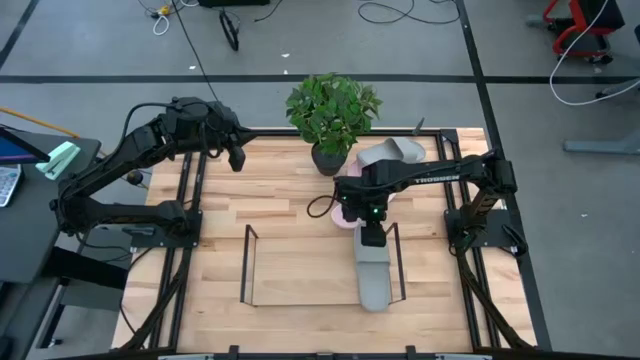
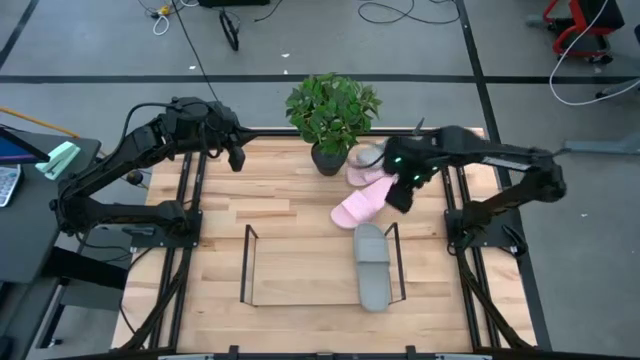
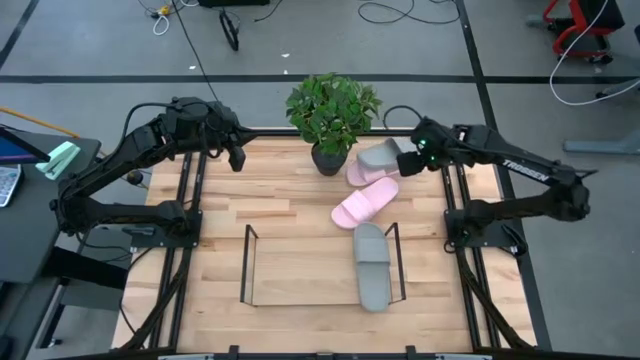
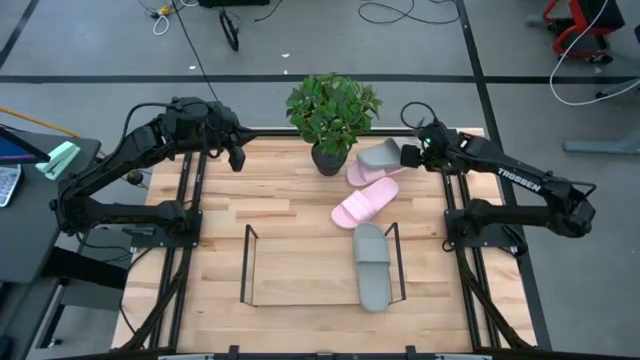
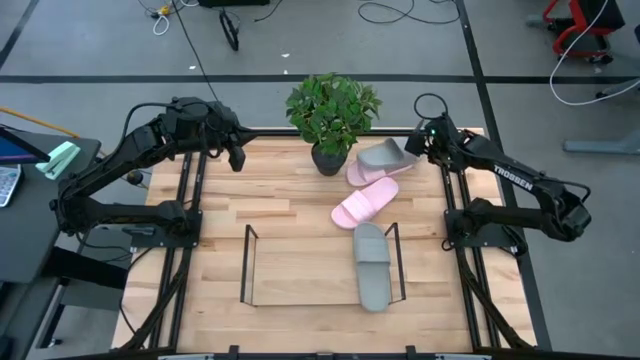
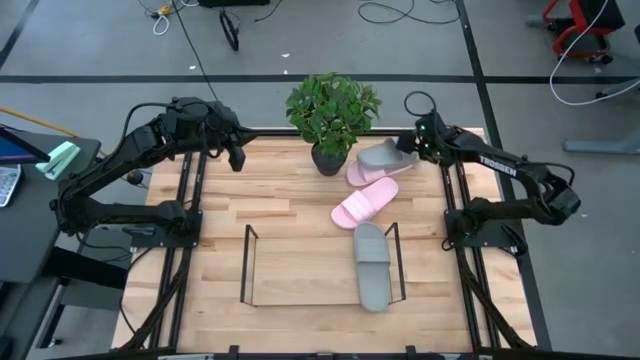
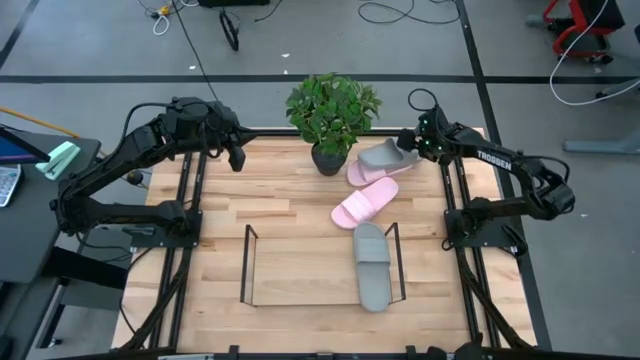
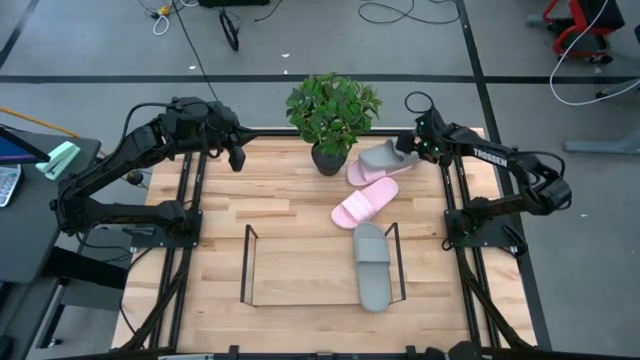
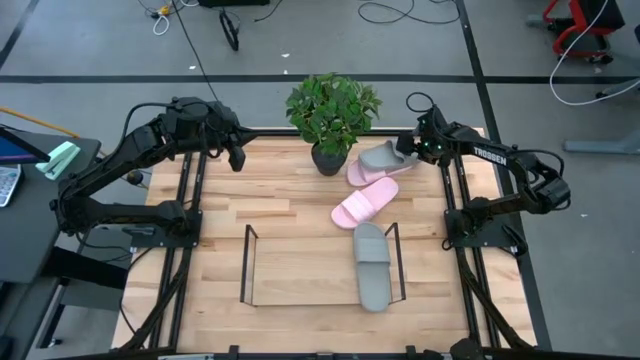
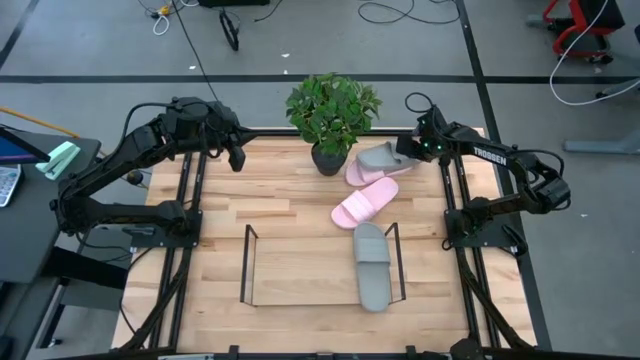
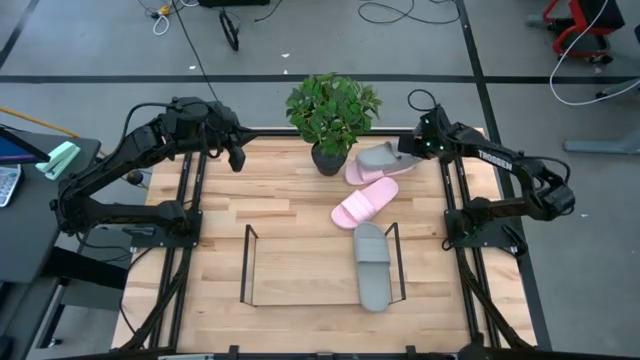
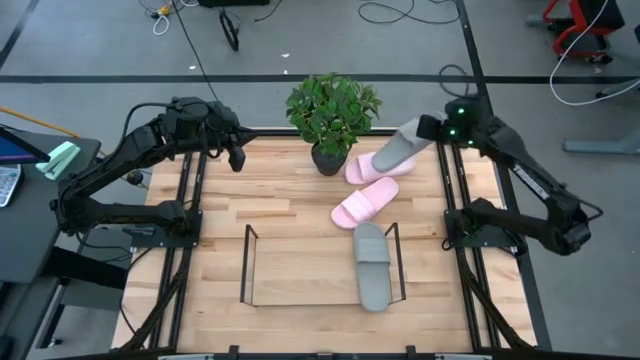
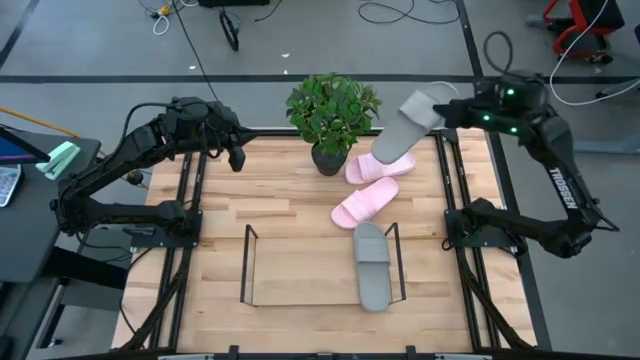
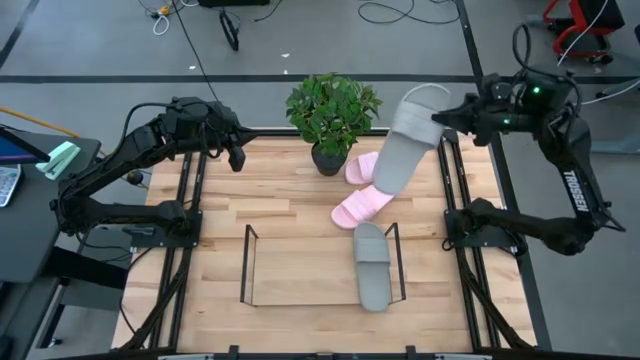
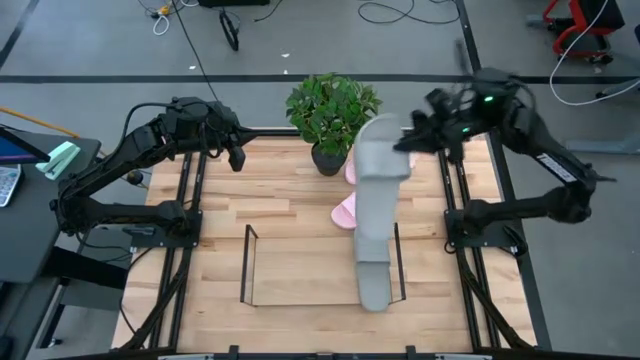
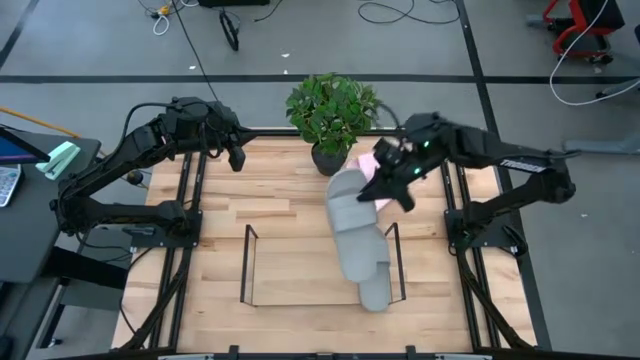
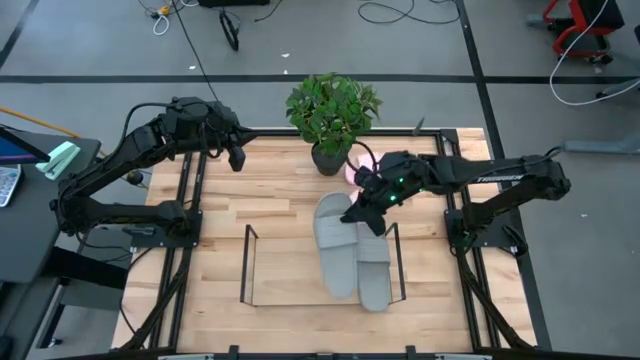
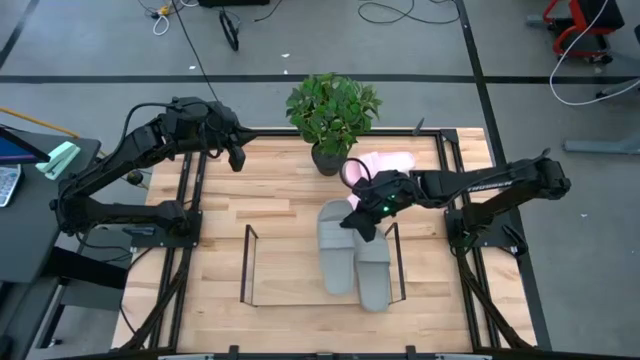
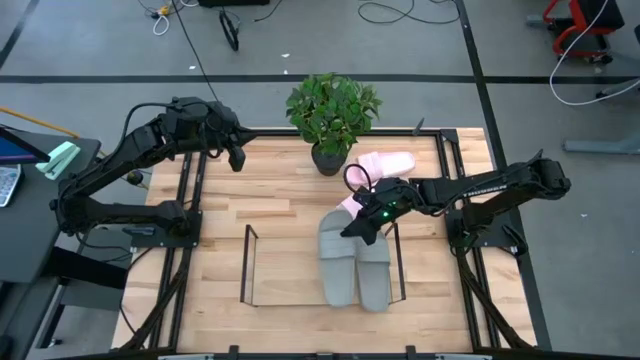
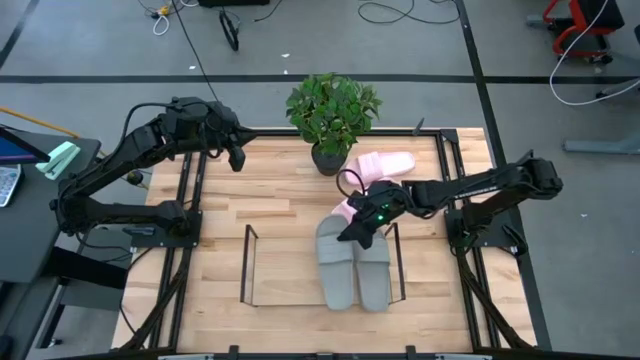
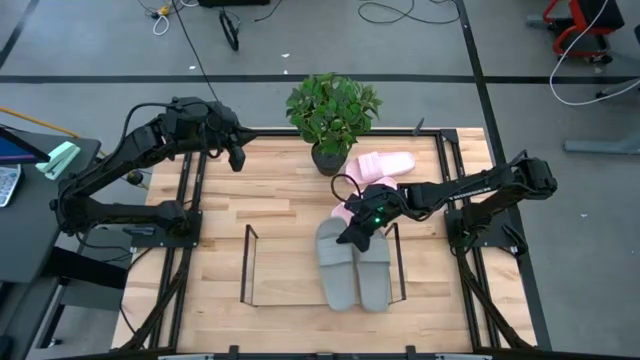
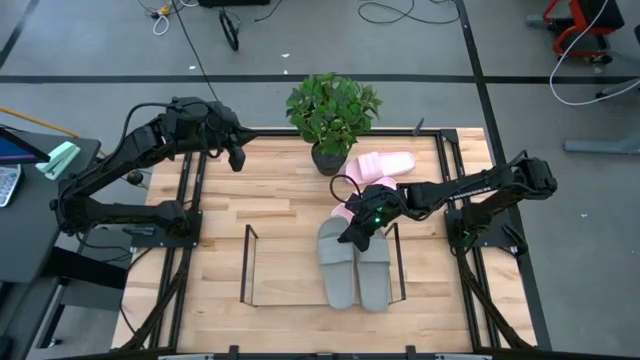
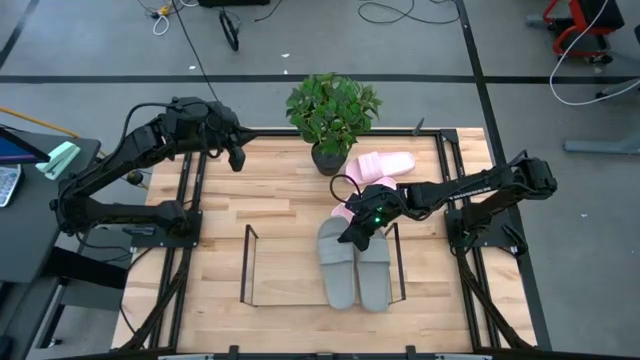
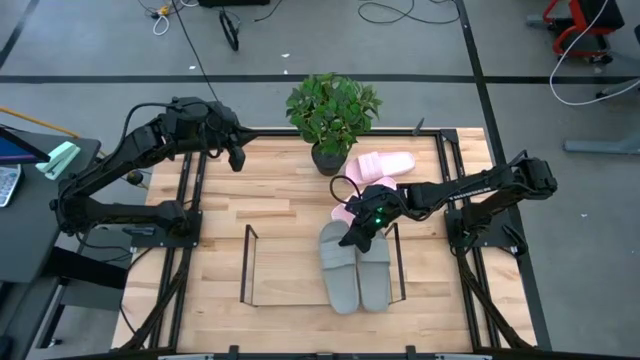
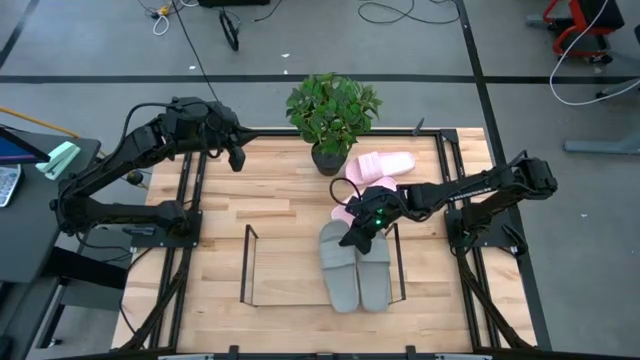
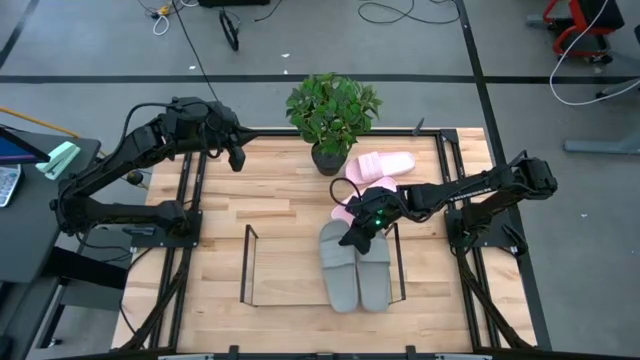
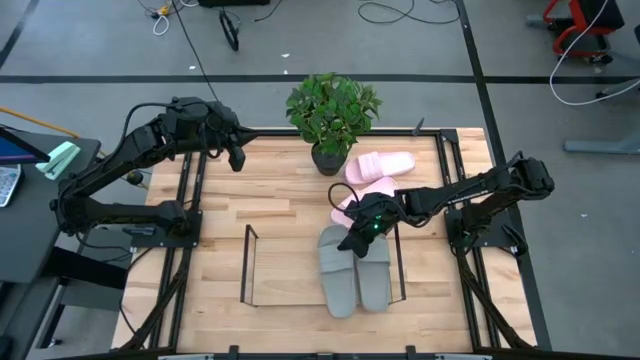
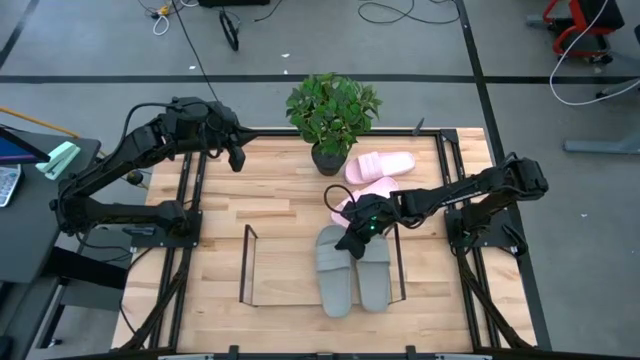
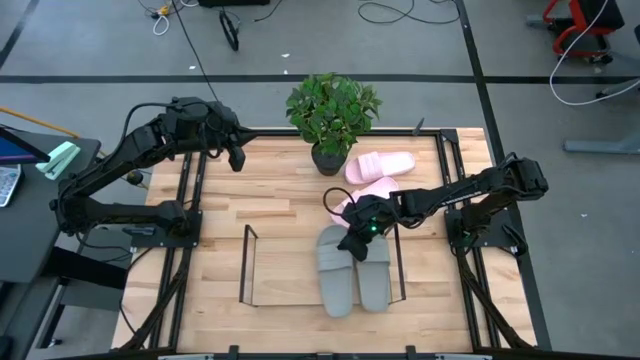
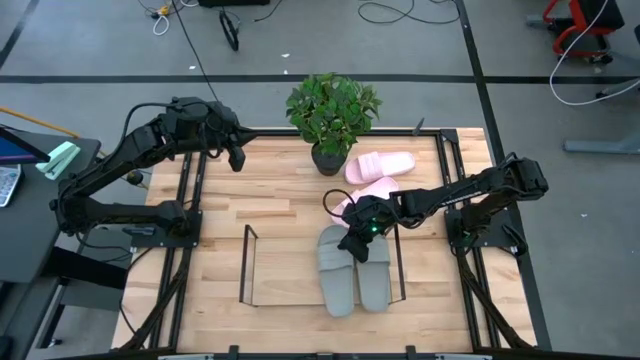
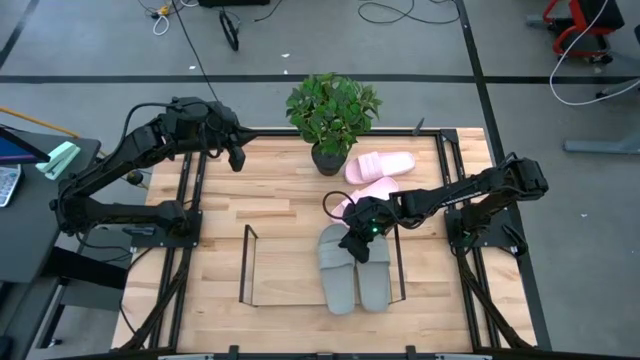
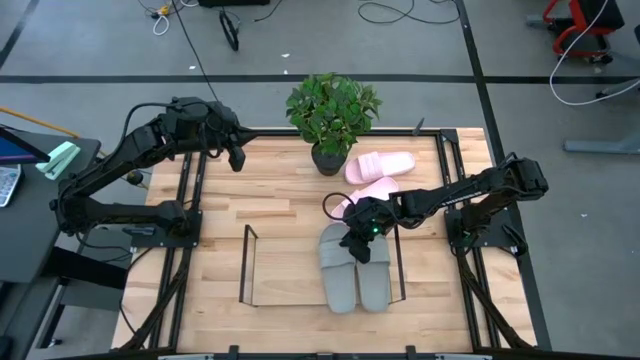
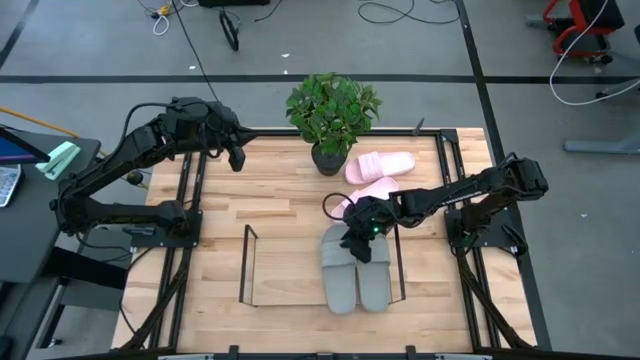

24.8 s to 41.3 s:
Task: Pick and place slides into the shelf
Put the gray slide on the shelf
